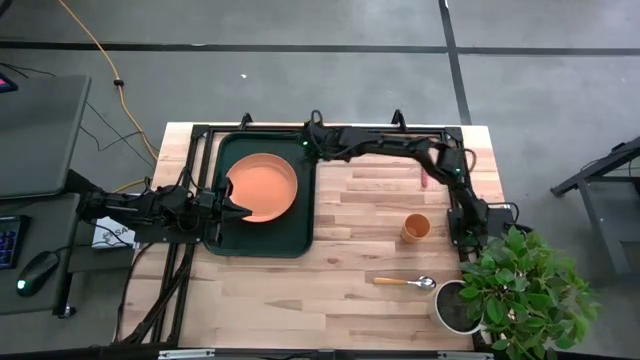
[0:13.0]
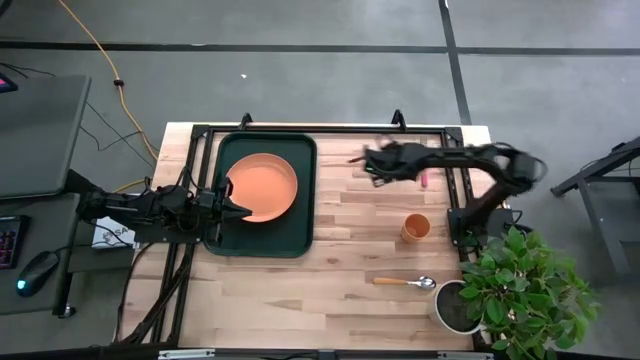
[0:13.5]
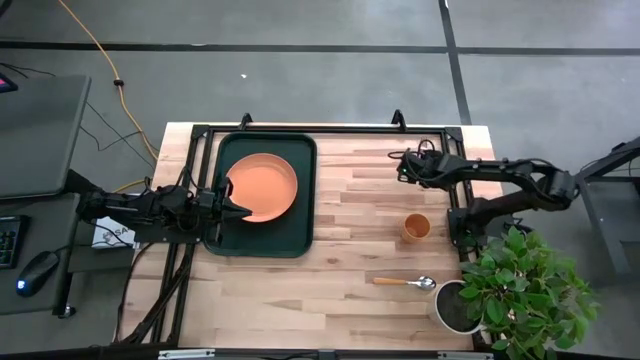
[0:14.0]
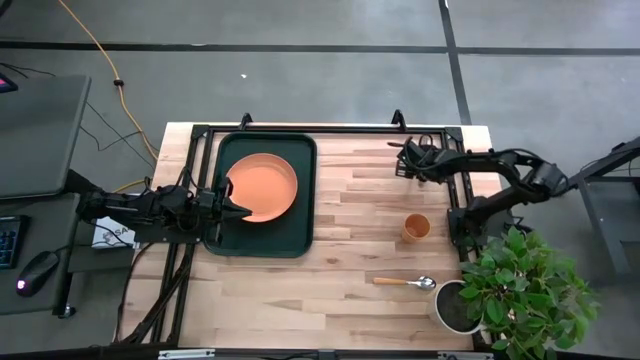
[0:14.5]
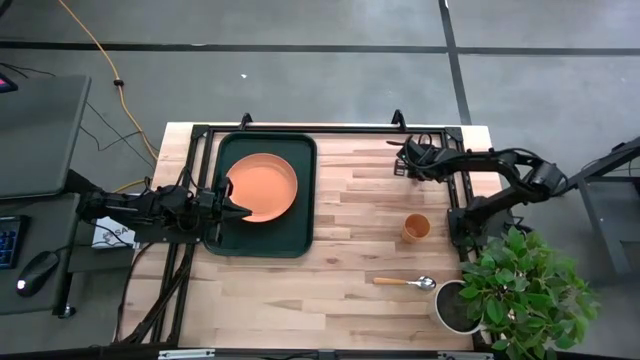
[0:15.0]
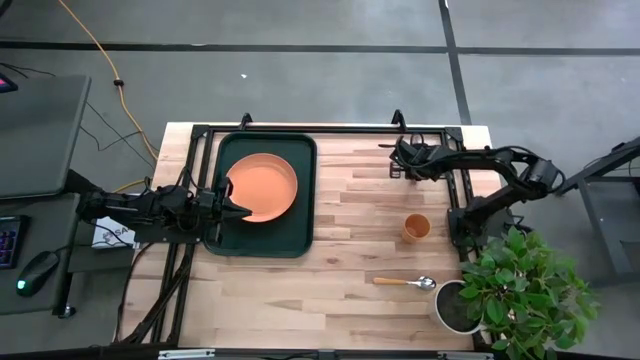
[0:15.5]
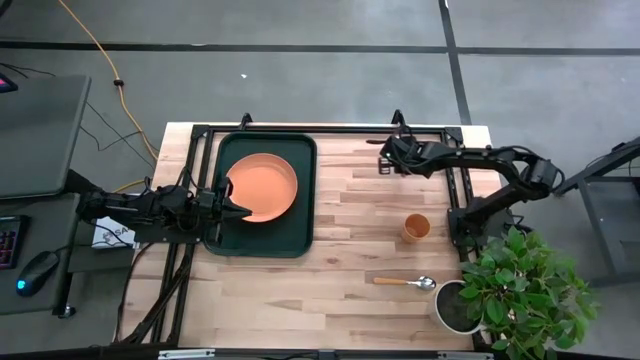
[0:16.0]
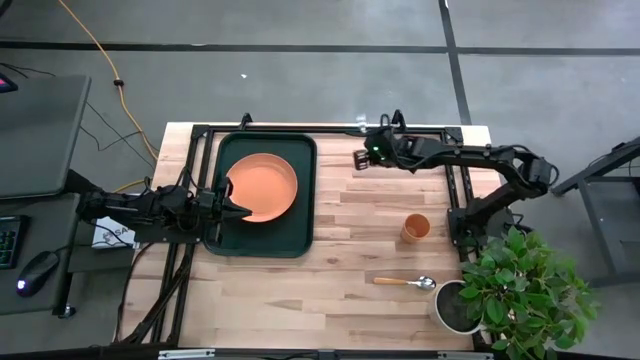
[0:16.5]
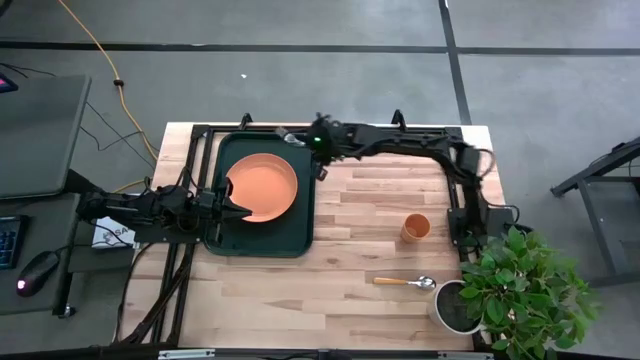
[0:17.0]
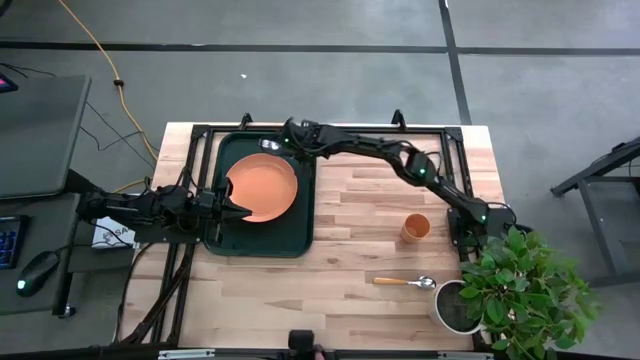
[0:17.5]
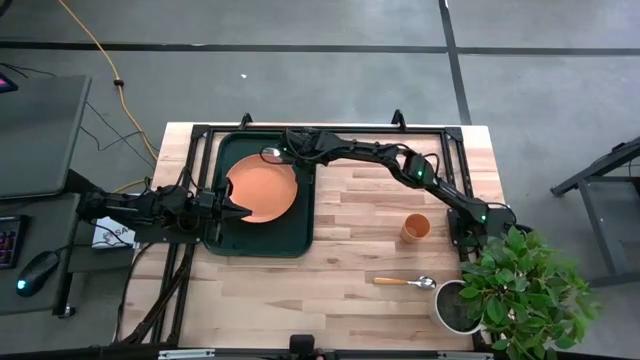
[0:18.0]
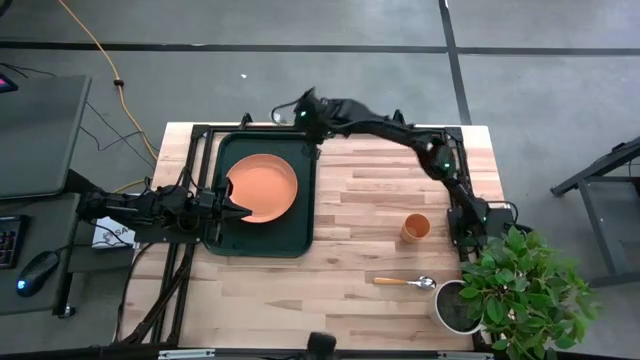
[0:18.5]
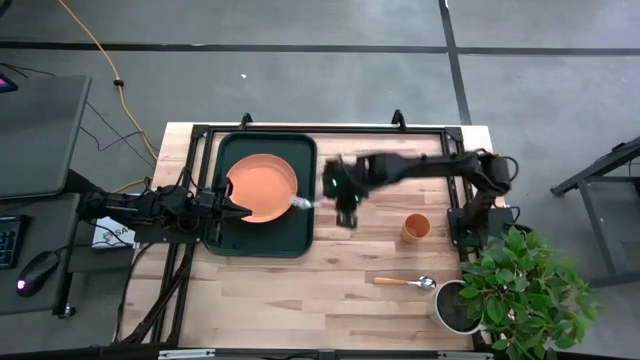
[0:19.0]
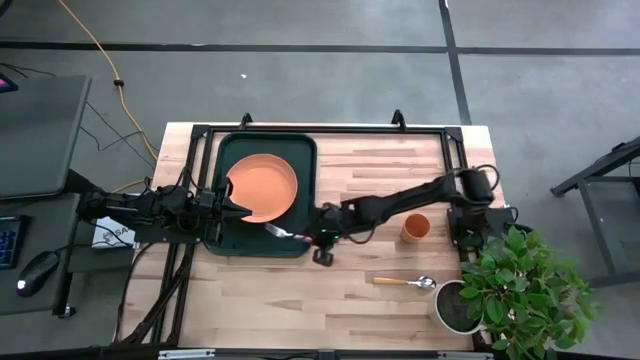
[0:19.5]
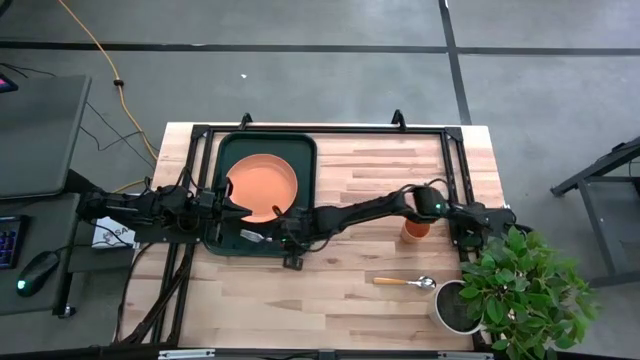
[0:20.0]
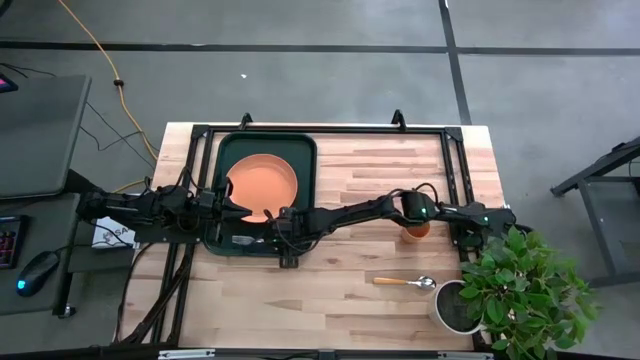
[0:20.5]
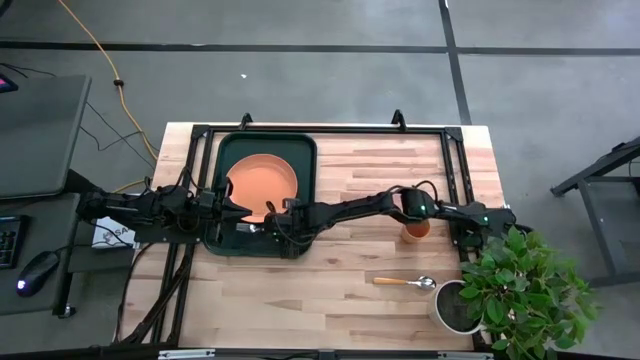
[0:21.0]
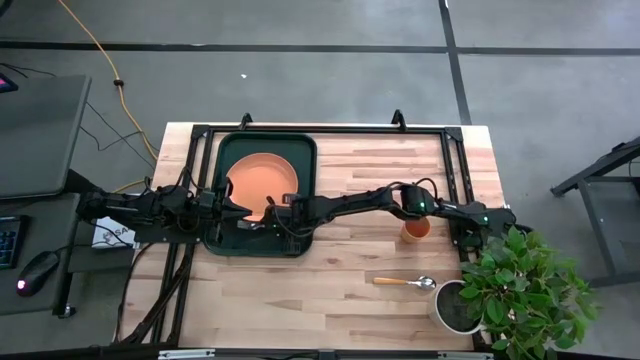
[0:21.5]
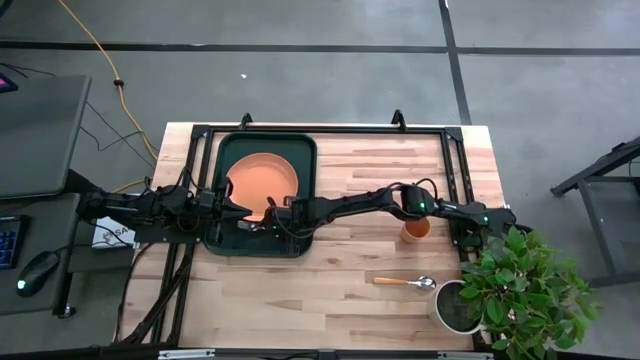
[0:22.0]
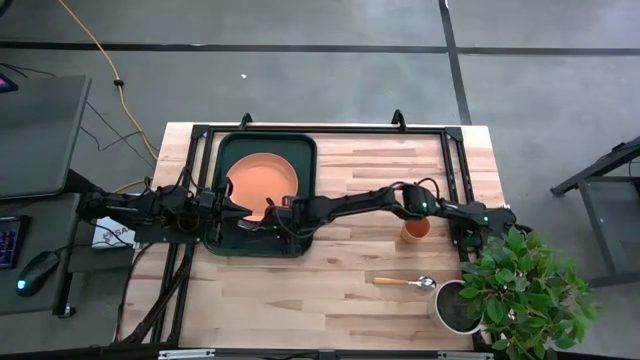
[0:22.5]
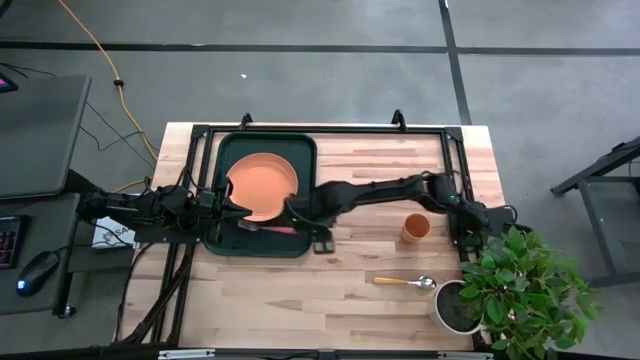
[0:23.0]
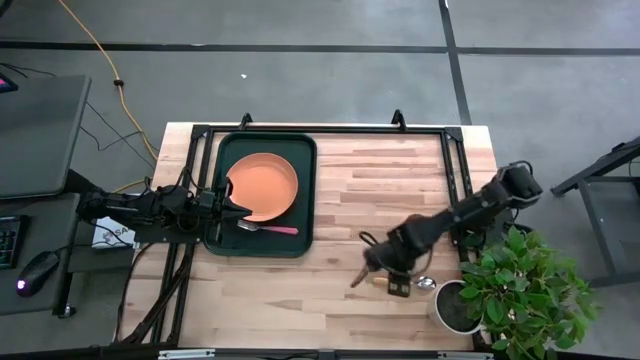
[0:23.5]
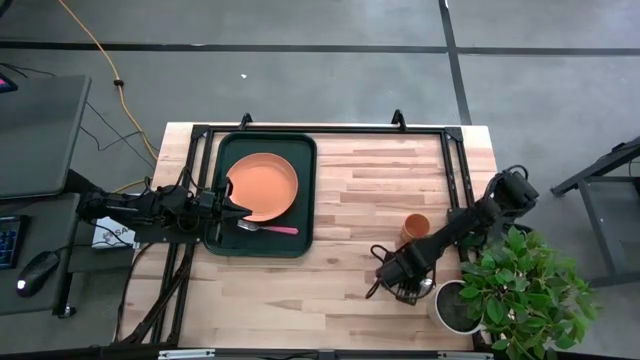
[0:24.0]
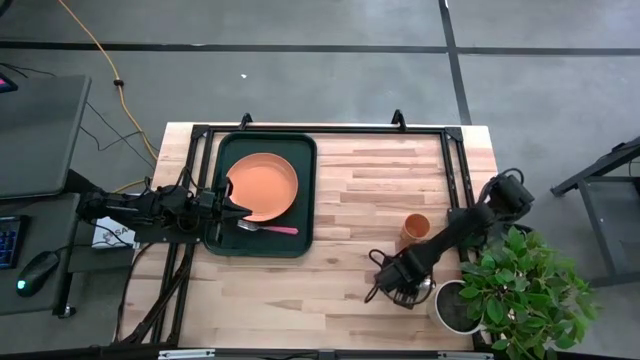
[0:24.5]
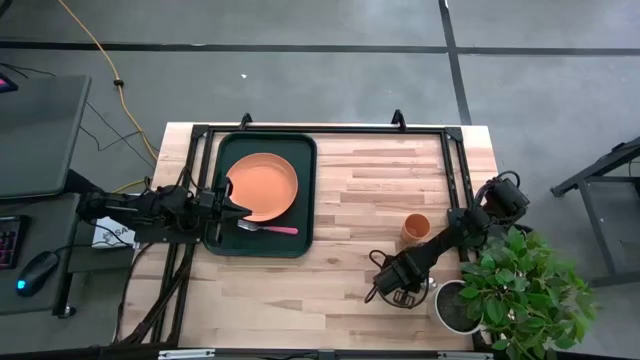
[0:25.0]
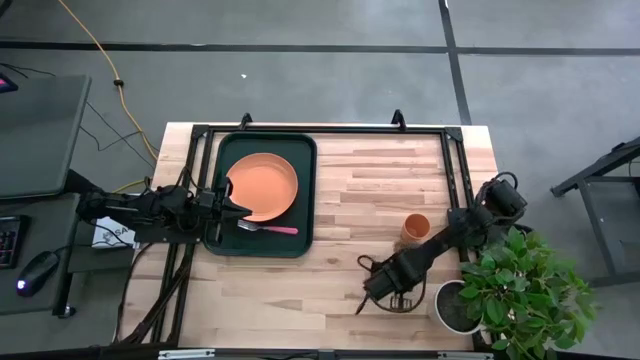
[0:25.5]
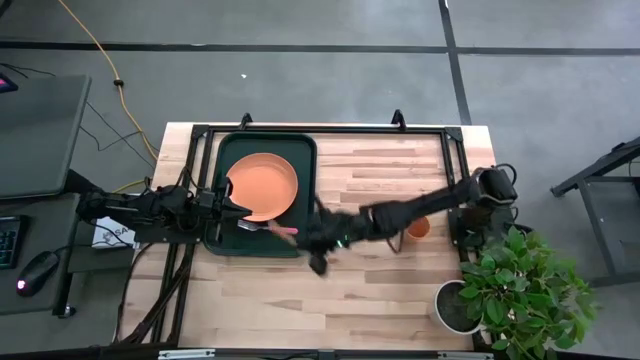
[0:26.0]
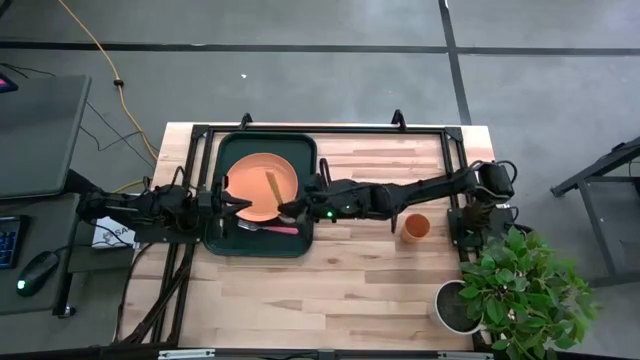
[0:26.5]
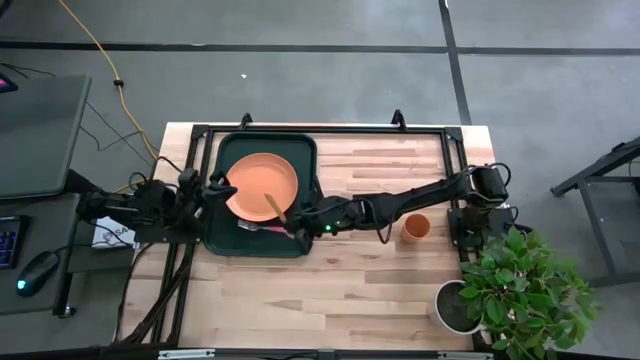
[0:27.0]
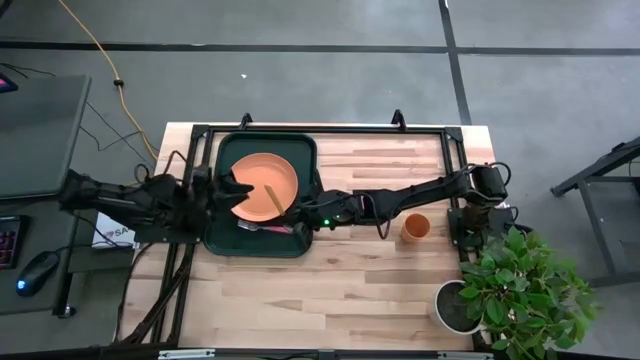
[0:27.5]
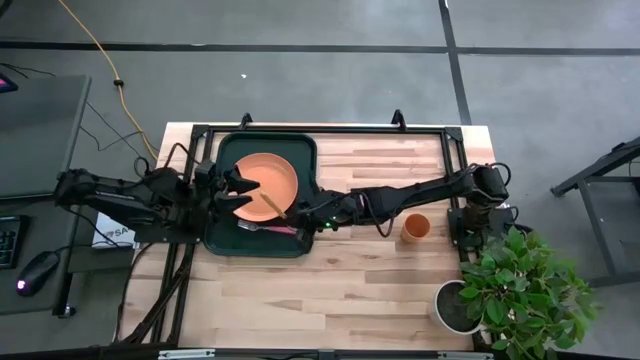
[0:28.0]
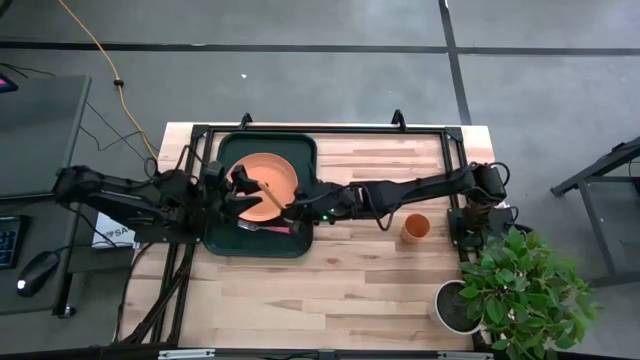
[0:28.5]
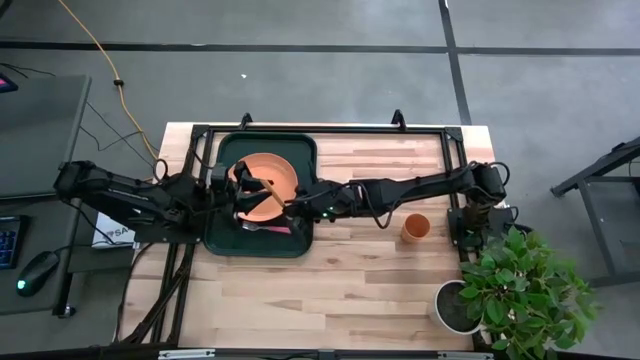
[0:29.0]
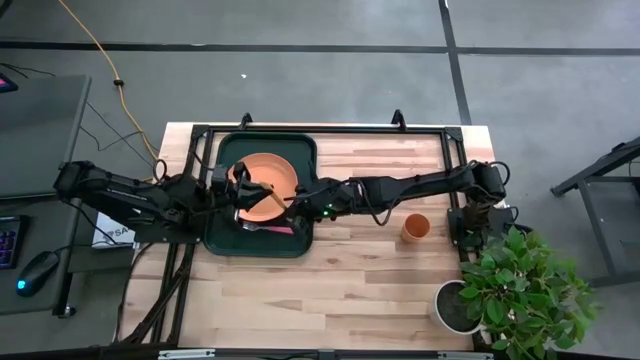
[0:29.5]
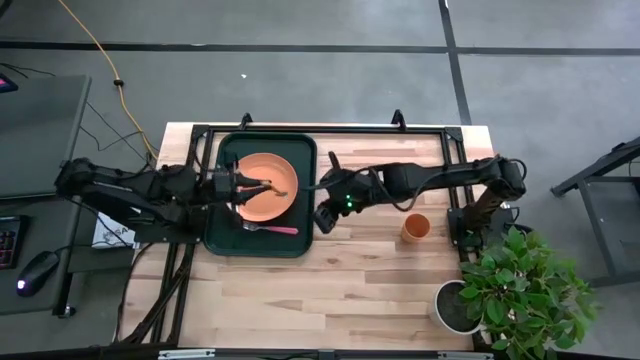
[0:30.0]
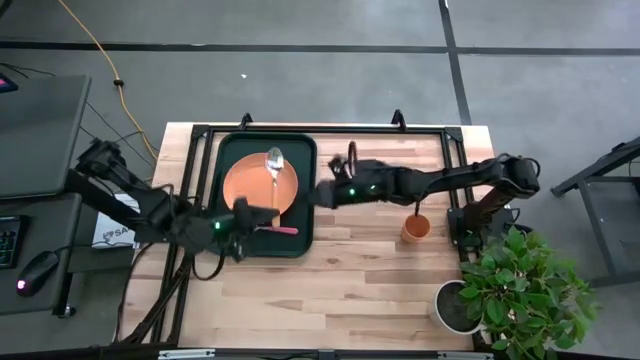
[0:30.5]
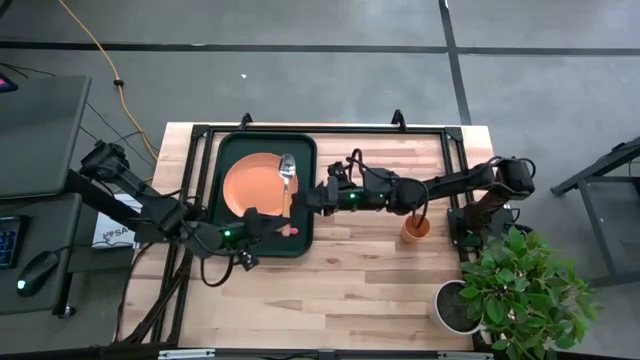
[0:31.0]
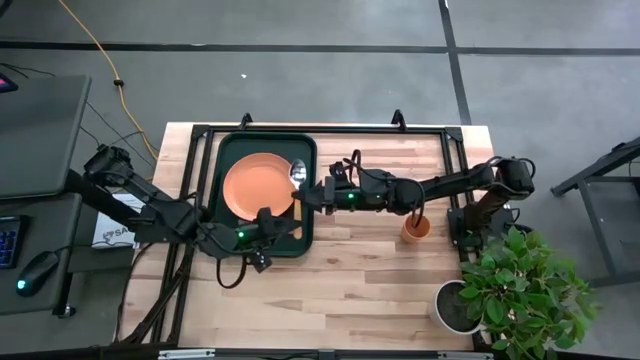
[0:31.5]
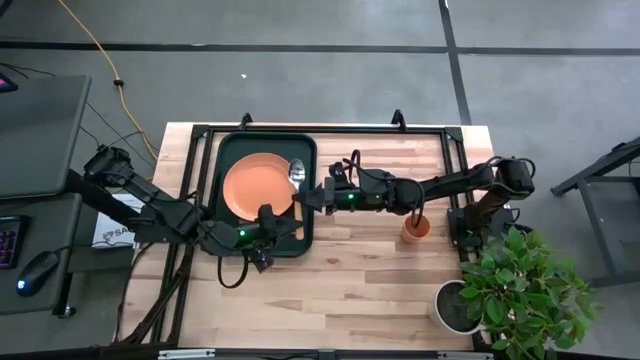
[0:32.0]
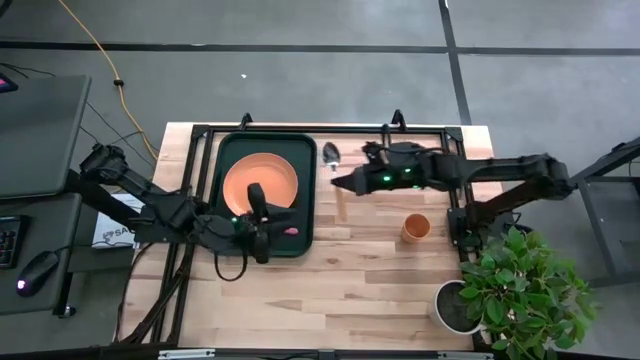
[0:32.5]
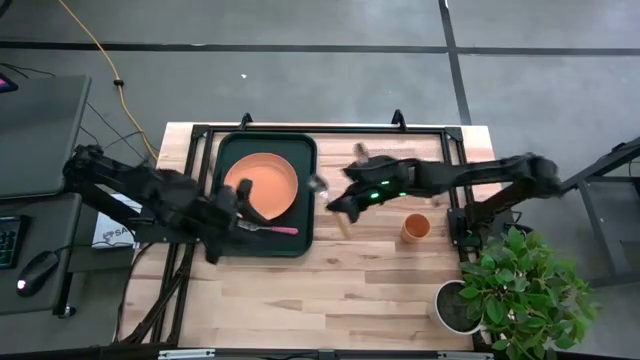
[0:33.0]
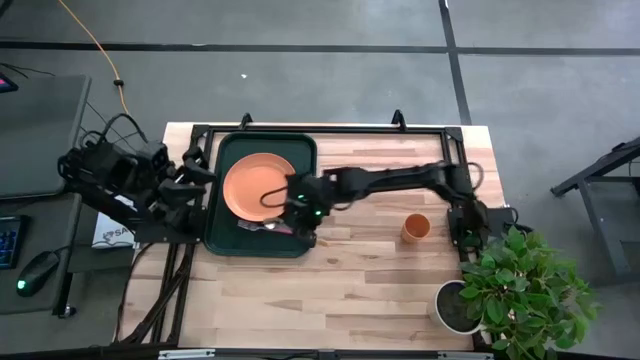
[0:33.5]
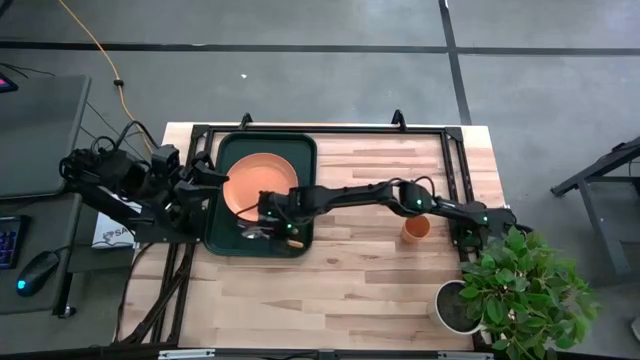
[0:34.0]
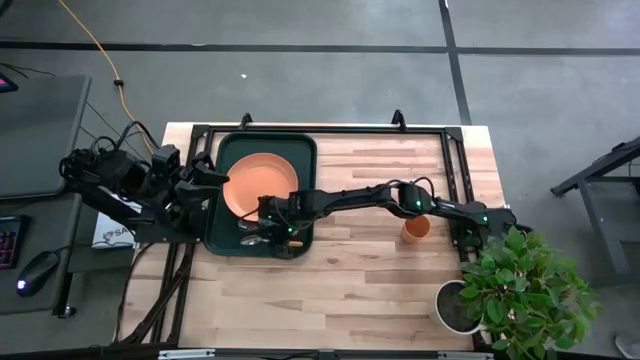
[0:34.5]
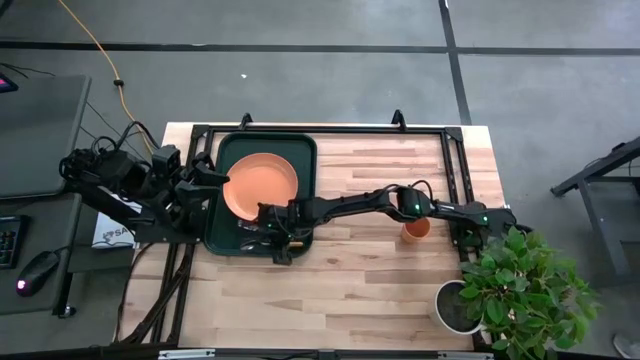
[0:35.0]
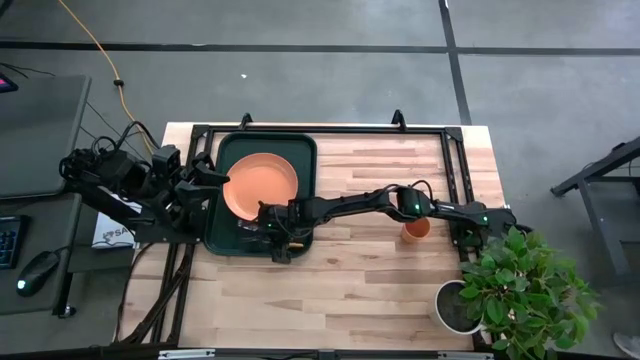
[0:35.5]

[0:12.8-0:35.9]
Task: Pick and place plate/cup/fork/spoon on tray
Put the pink fork on the black serving tray to the left side of the orange plate
